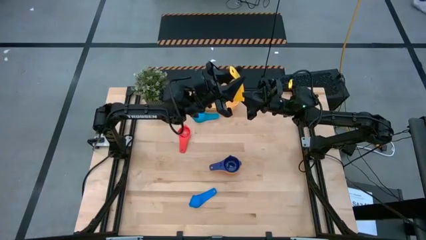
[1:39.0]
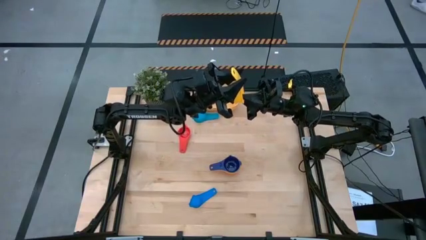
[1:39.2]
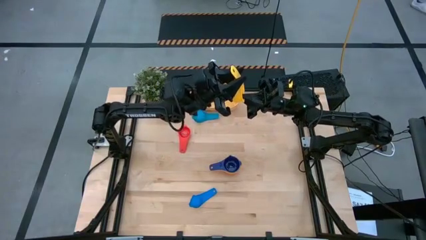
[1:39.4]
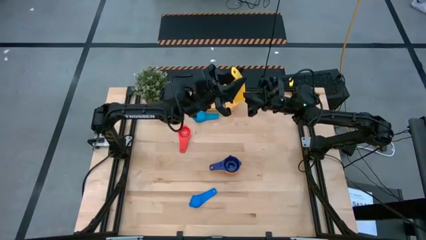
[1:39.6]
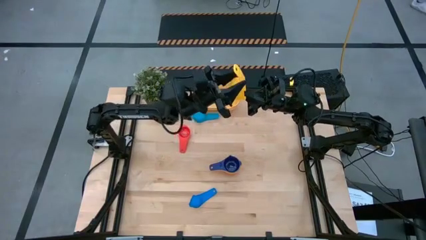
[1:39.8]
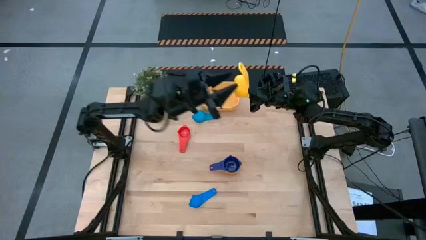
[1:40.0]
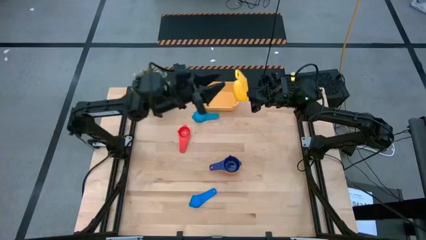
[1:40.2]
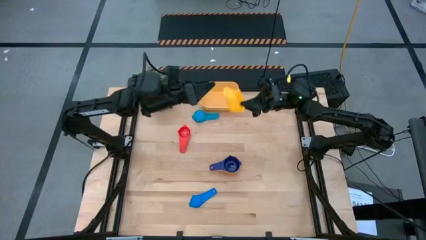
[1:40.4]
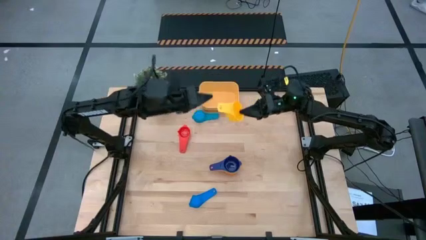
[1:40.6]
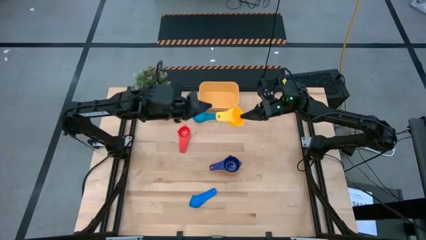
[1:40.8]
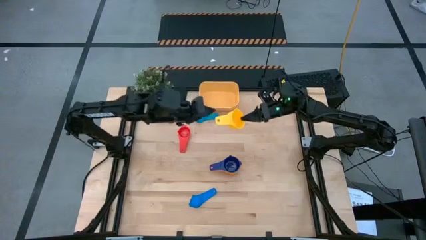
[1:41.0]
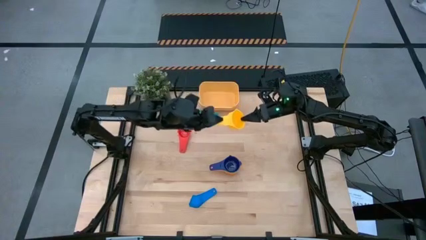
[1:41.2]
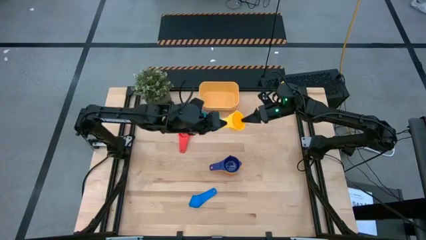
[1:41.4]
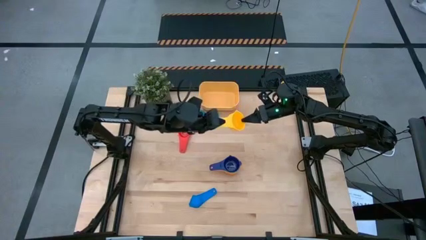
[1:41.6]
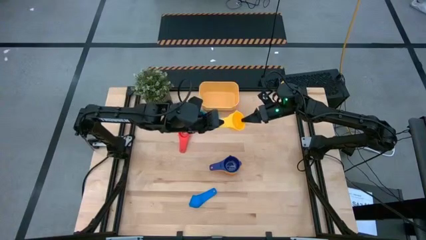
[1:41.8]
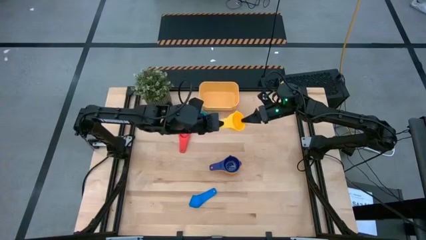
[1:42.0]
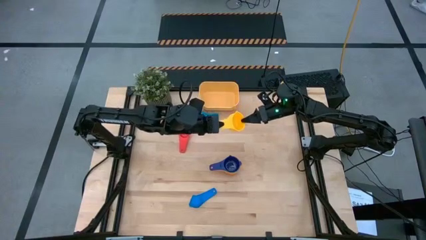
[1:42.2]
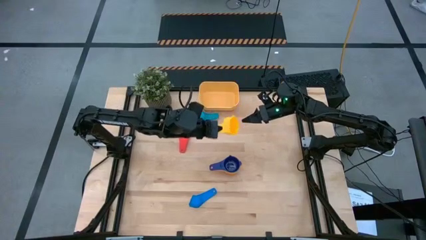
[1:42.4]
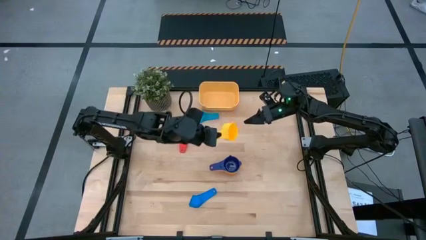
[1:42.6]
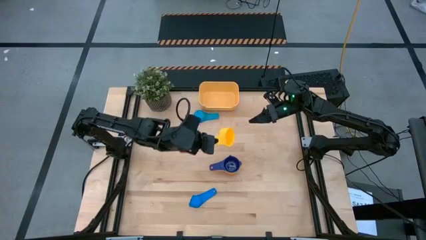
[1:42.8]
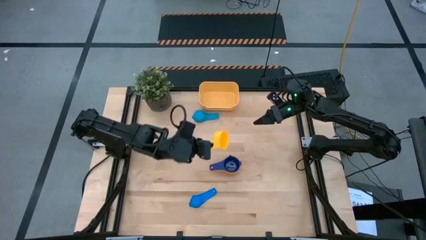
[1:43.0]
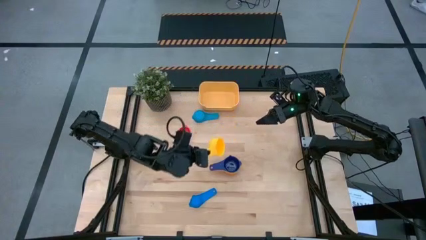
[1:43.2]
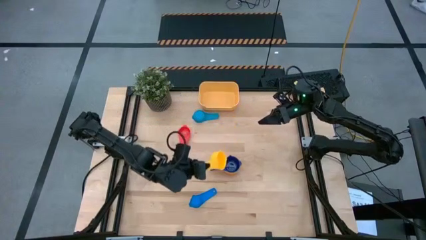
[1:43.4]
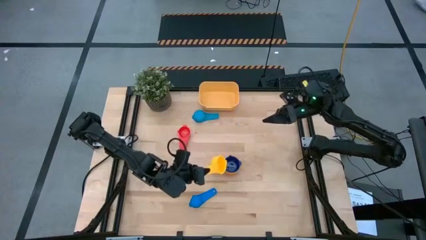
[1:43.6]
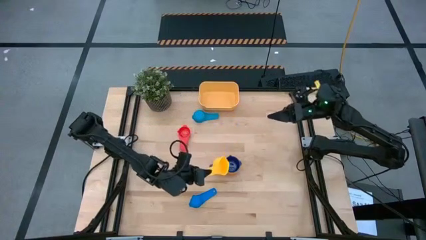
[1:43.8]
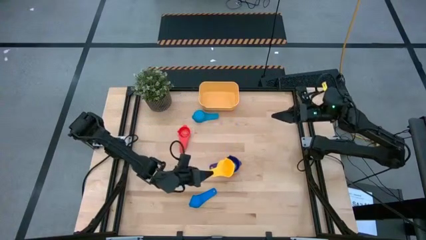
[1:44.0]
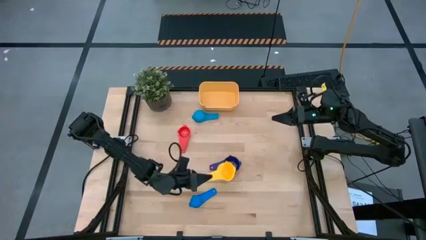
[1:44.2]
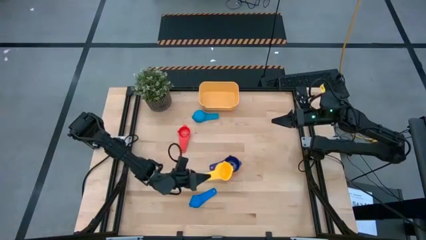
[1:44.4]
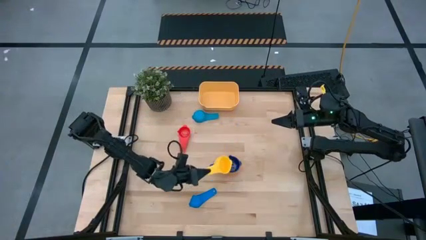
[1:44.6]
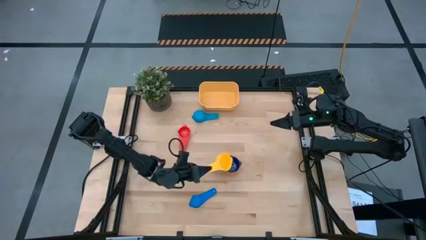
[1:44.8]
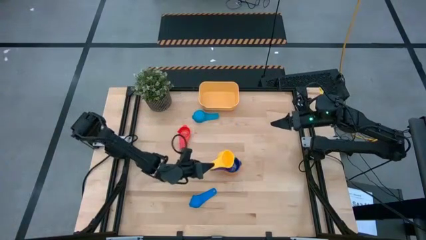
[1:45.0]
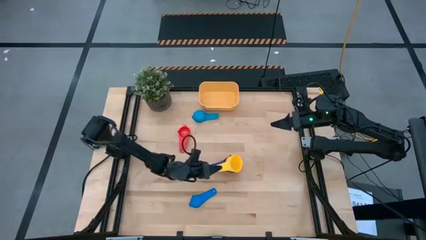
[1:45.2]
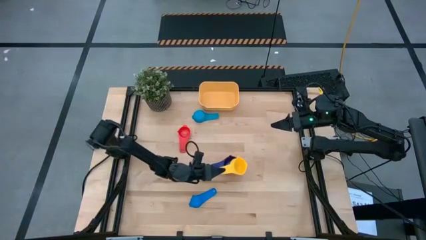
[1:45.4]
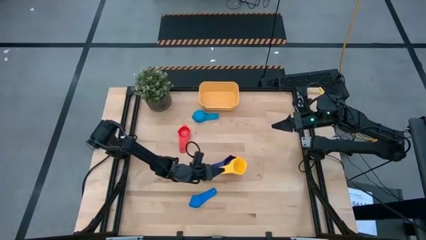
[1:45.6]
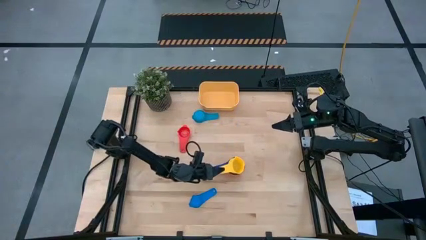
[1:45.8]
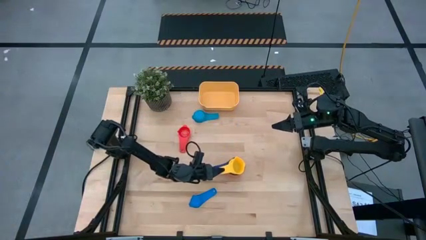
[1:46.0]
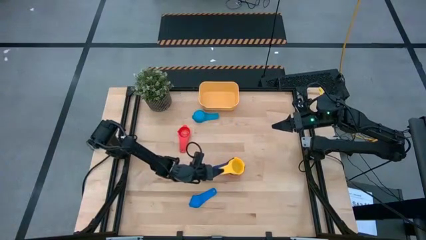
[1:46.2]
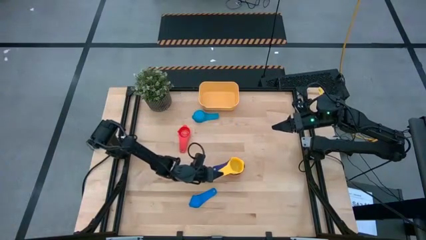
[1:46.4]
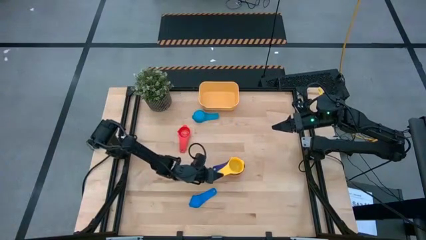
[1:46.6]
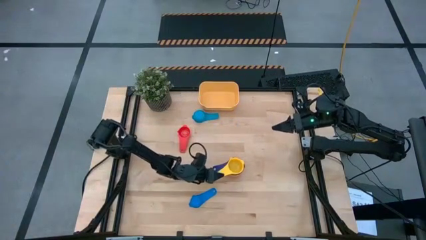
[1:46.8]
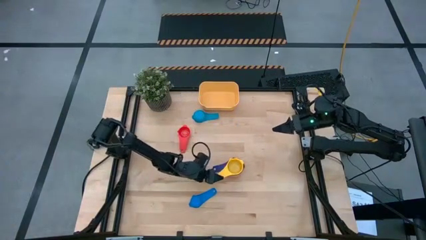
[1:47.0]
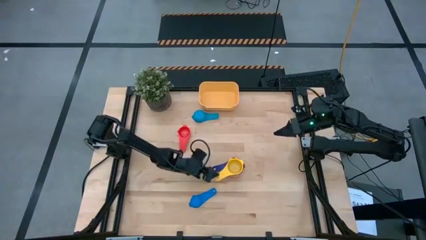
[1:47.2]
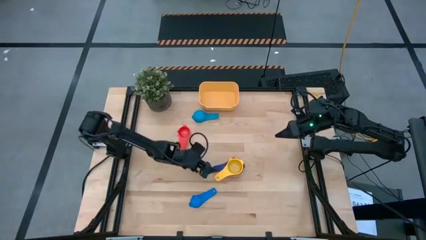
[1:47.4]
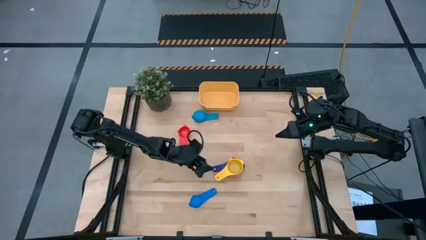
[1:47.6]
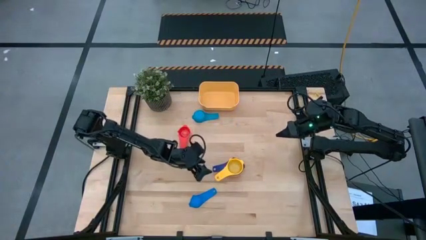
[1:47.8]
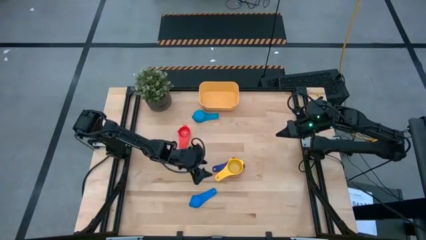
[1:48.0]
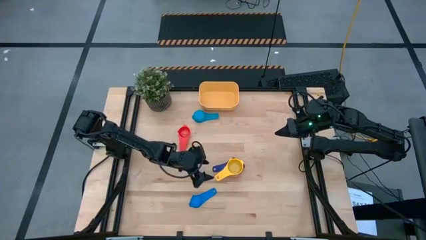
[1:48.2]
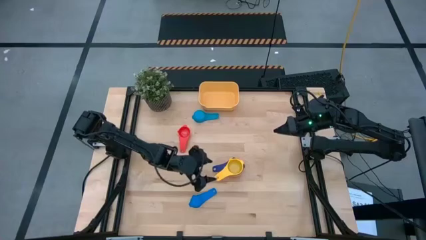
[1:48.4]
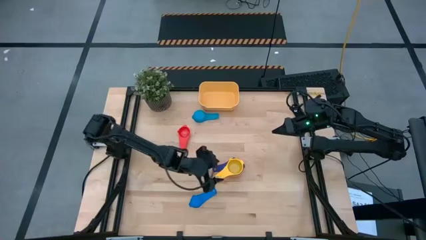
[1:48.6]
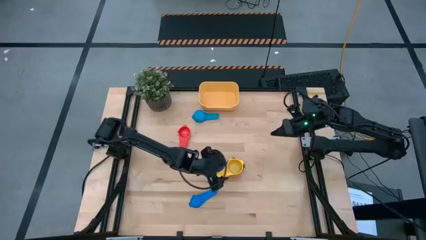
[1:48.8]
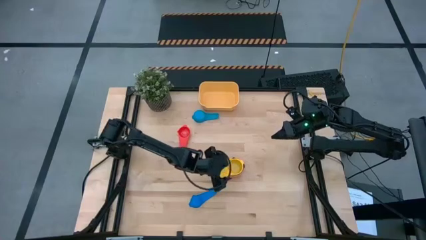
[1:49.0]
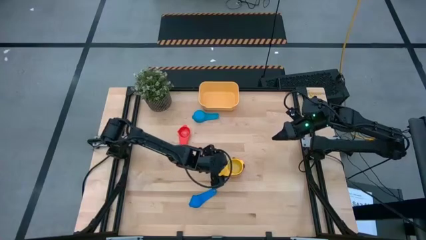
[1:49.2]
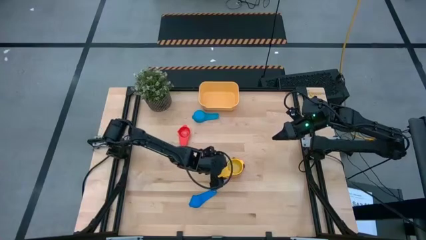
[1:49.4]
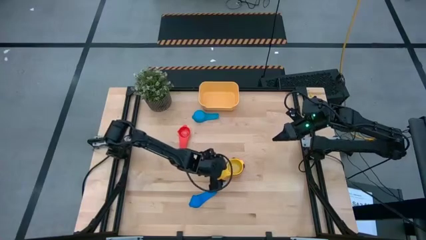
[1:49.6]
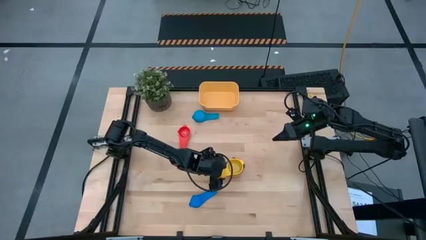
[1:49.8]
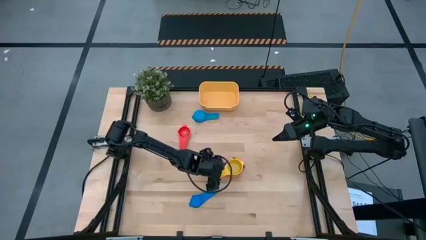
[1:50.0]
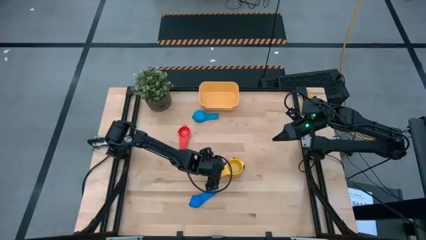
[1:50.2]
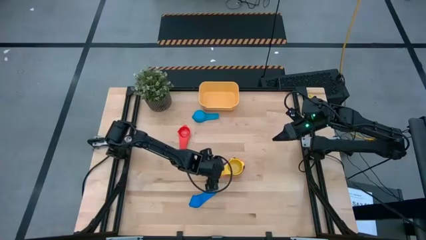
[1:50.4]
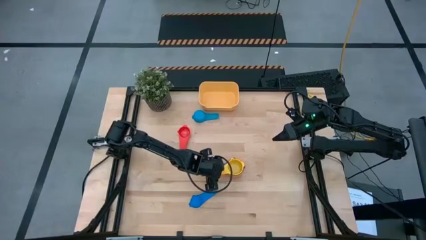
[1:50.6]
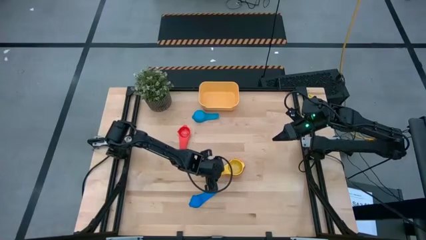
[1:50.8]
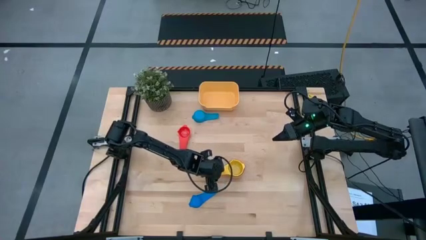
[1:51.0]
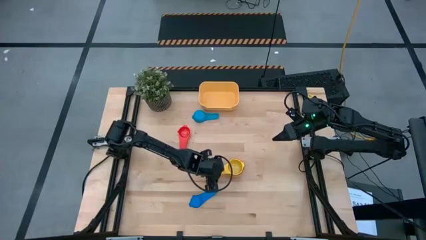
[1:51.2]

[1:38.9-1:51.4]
Task: Nest measuring cups in basket
Stack the yellow measuring cup on top of the dark blue measuring cup

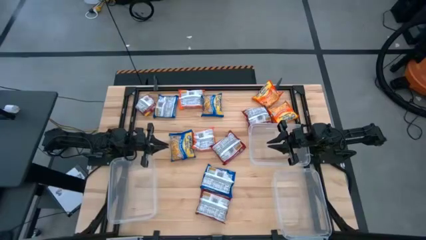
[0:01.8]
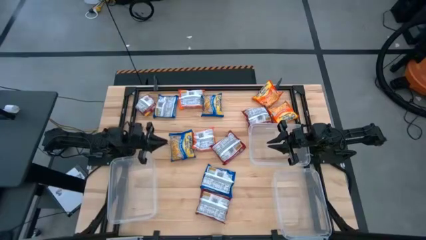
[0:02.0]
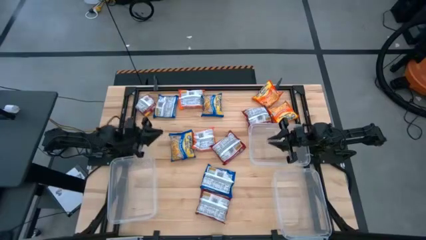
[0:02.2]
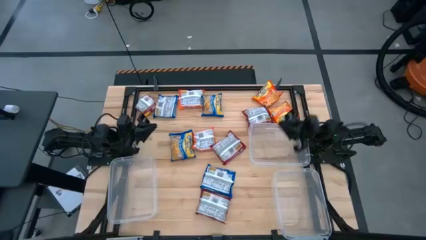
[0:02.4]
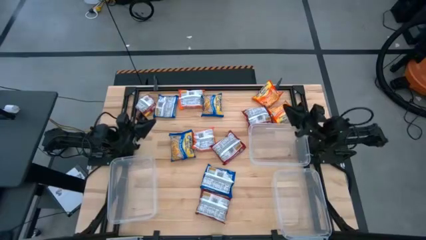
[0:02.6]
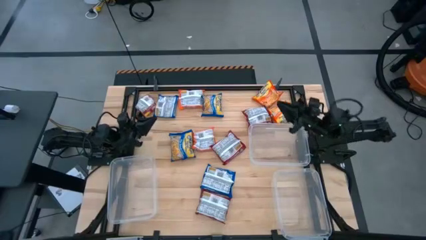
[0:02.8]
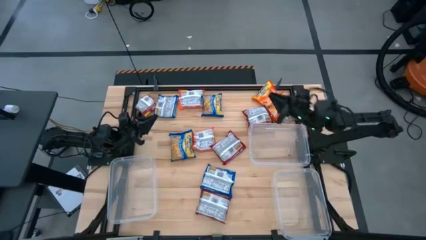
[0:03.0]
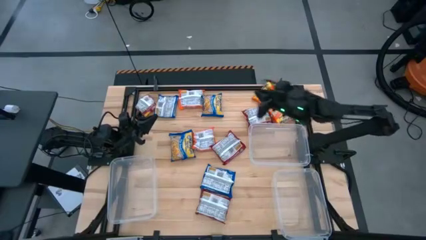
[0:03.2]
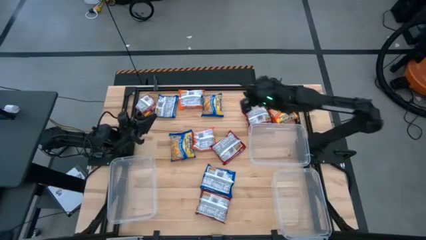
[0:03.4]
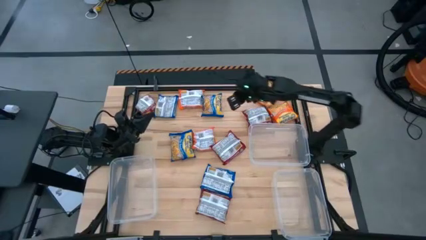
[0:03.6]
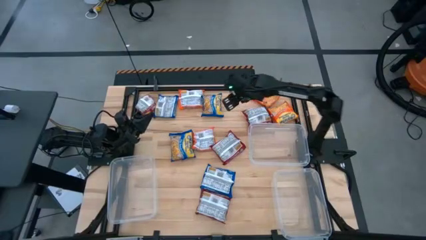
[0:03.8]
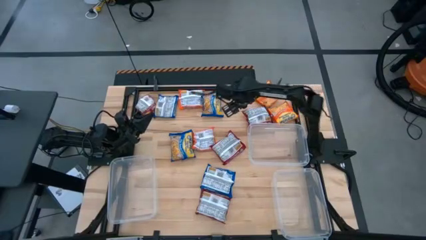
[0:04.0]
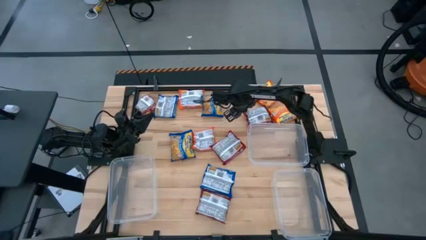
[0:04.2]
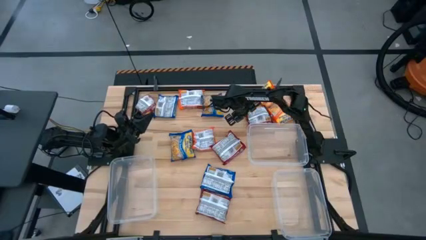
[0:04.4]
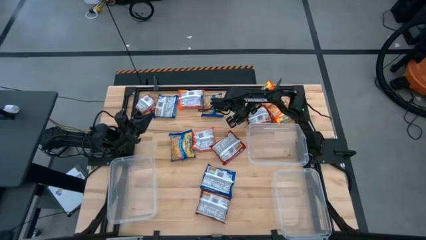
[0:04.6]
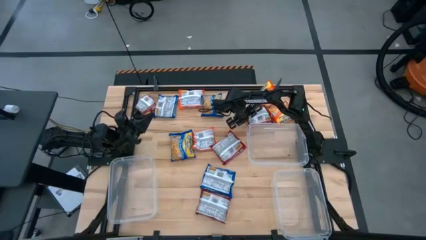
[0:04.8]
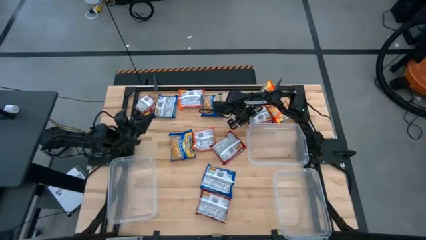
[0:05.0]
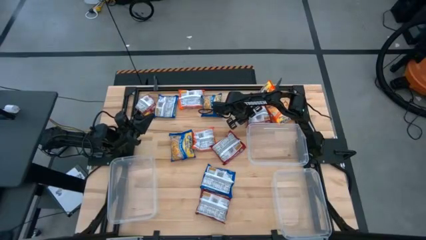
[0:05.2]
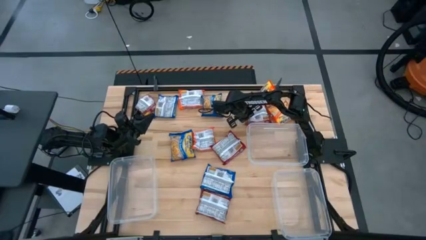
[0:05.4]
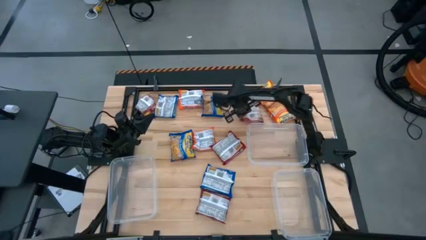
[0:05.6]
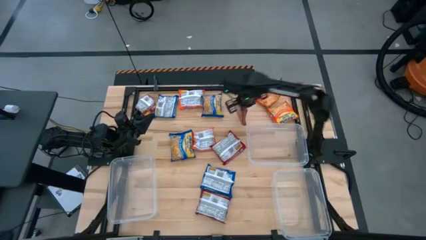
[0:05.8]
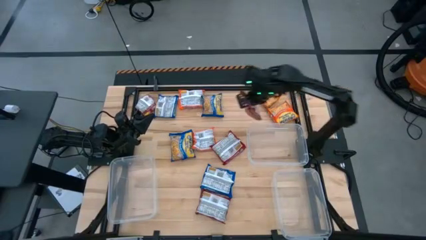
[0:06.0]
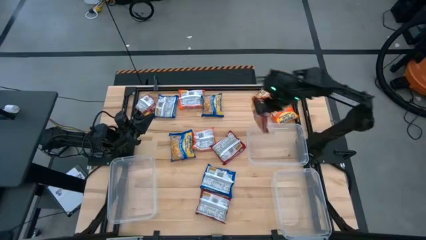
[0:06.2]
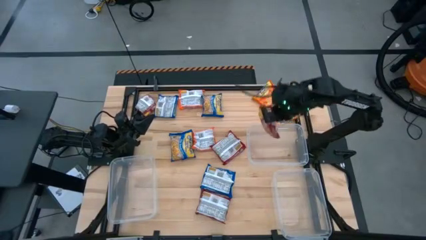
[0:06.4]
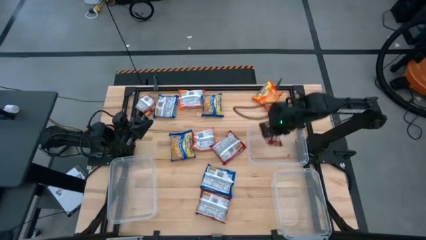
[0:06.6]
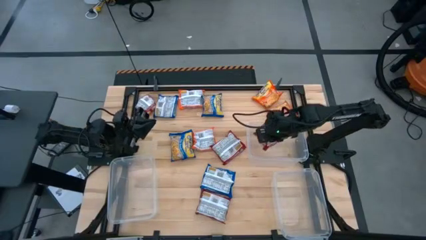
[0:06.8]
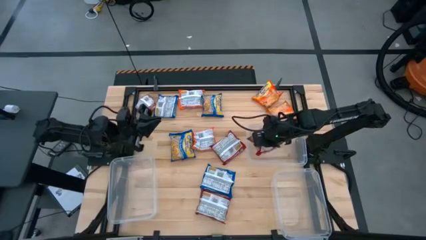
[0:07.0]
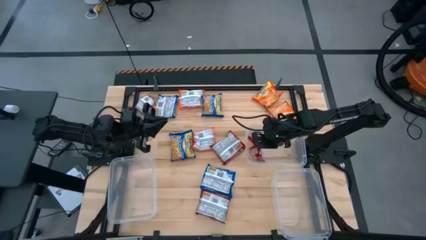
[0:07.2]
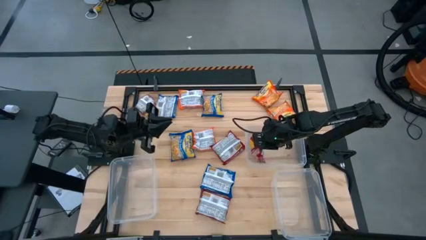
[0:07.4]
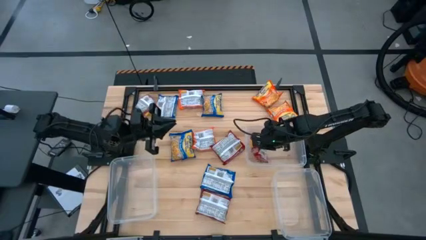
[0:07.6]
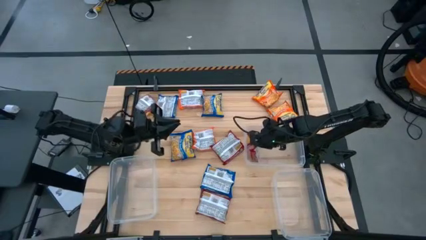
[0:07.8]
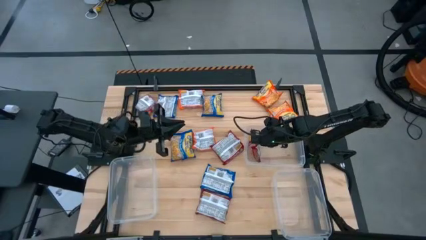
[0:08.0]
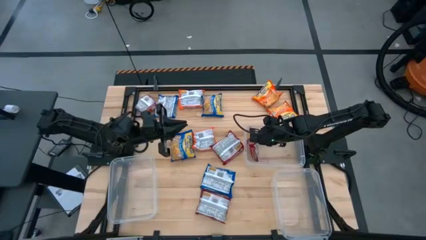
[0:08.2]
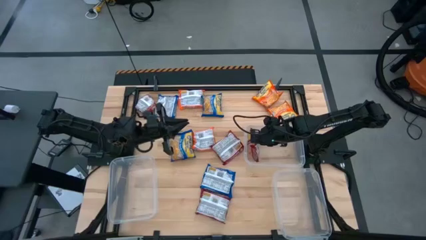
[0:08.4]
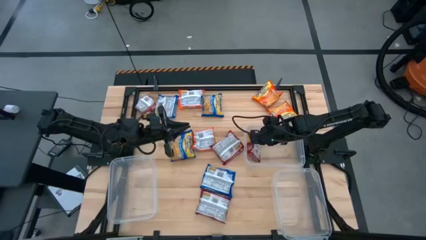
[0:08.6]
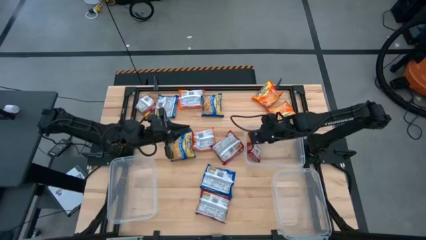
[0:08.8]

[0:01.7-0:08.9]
Task: Sort Maruchan noodles
Put the red noodle pack into the top right container
